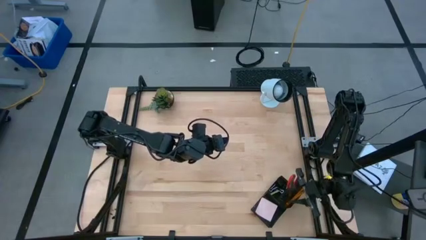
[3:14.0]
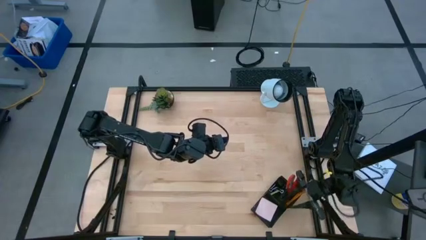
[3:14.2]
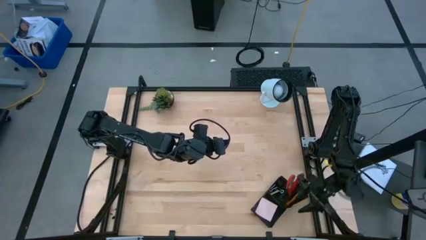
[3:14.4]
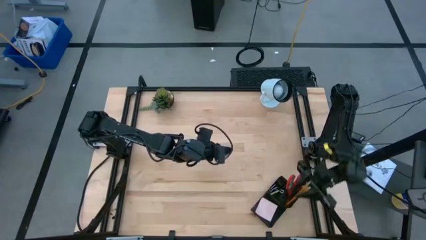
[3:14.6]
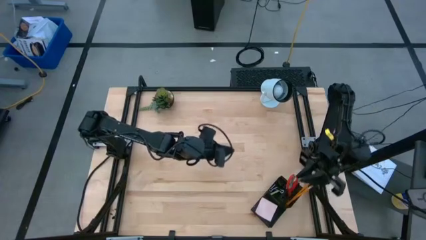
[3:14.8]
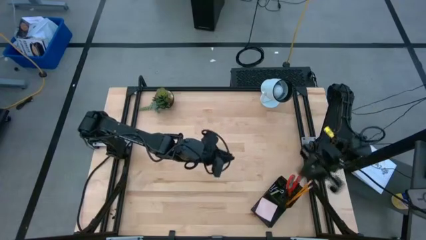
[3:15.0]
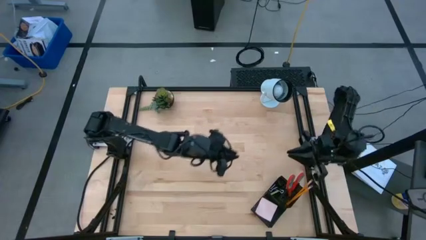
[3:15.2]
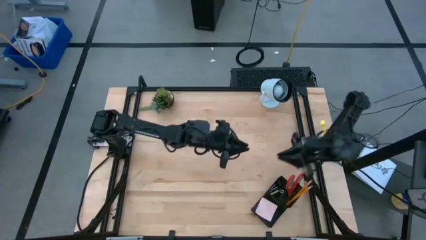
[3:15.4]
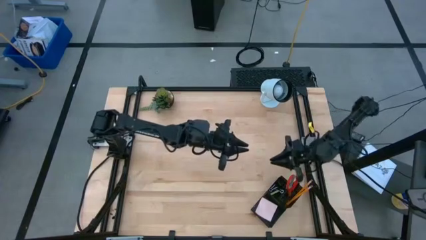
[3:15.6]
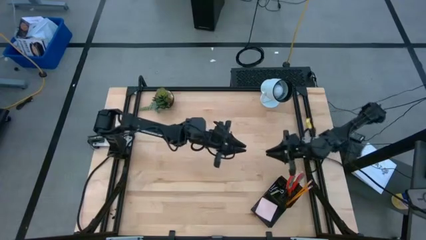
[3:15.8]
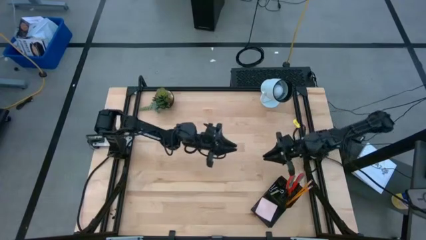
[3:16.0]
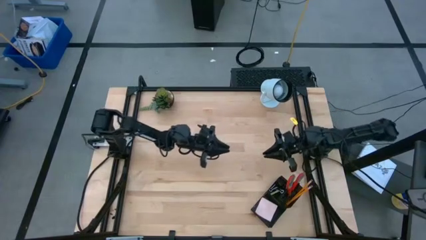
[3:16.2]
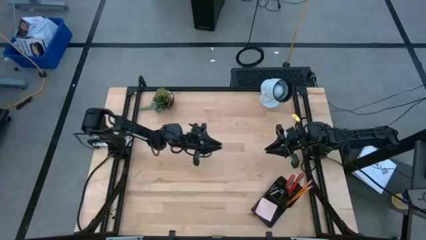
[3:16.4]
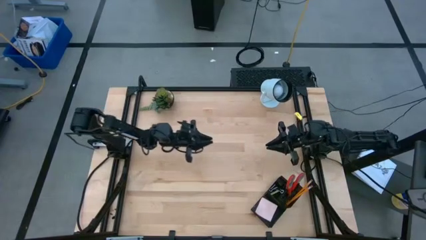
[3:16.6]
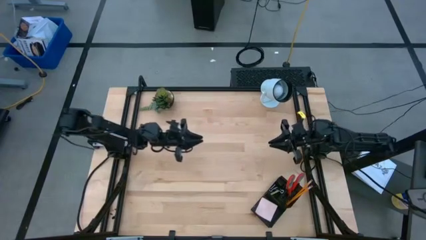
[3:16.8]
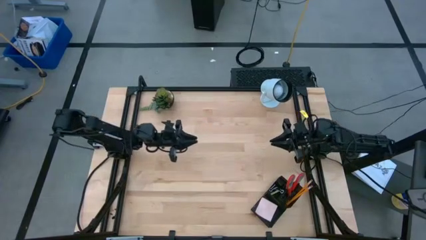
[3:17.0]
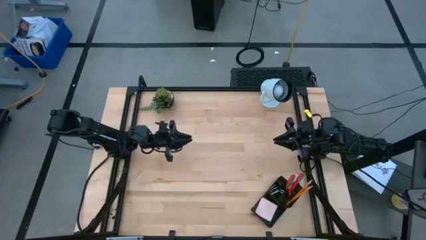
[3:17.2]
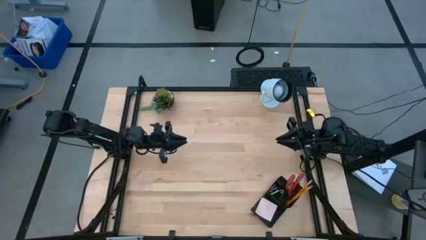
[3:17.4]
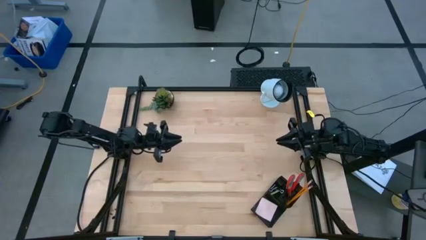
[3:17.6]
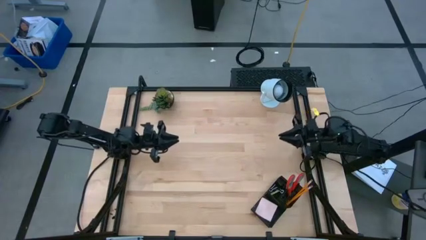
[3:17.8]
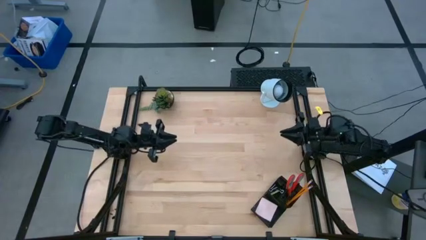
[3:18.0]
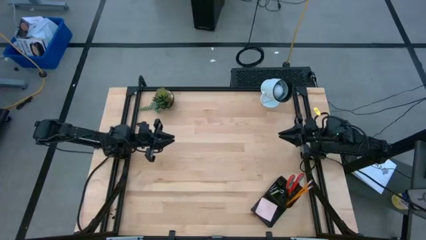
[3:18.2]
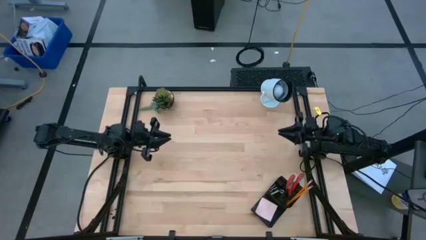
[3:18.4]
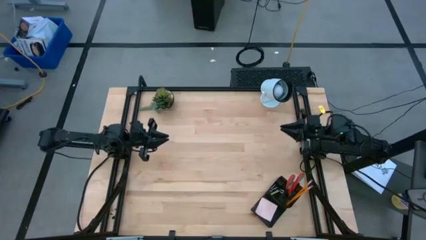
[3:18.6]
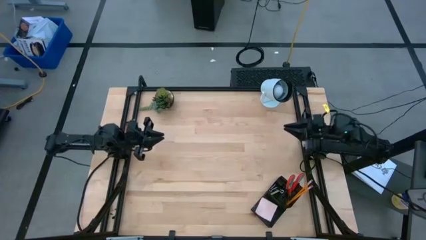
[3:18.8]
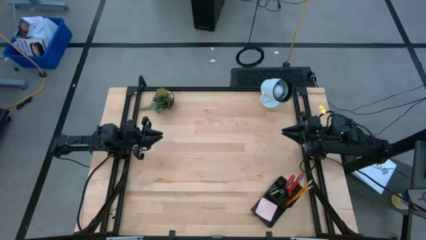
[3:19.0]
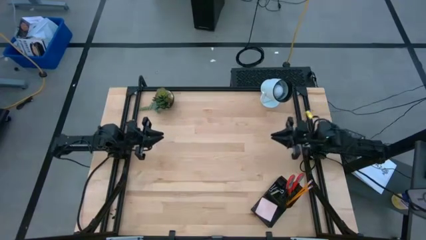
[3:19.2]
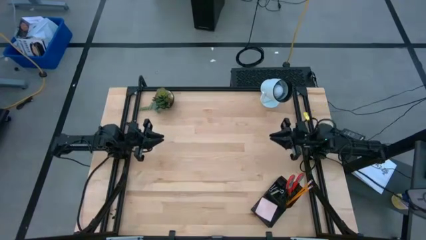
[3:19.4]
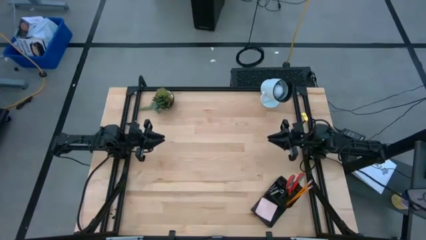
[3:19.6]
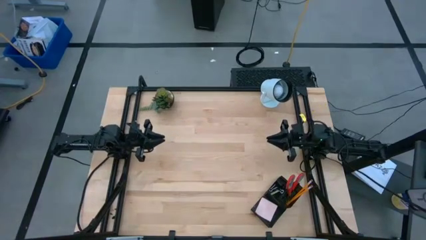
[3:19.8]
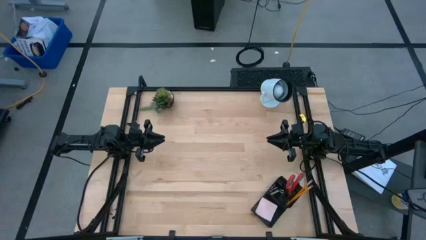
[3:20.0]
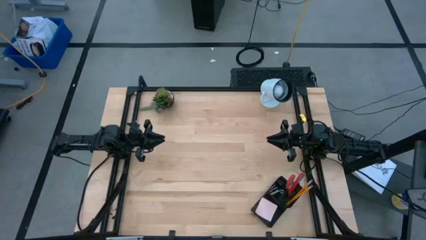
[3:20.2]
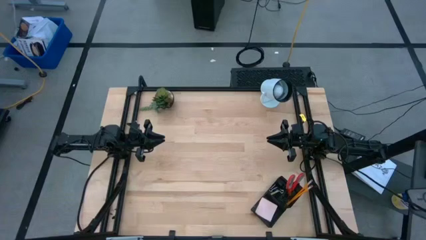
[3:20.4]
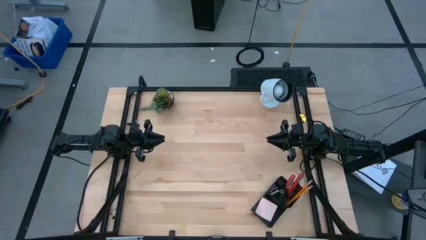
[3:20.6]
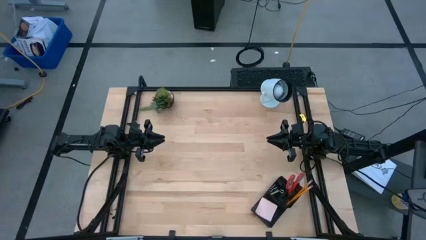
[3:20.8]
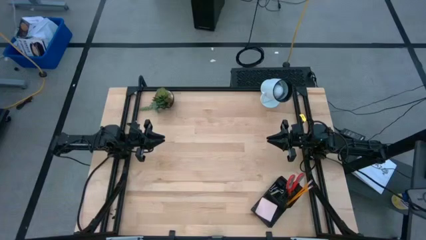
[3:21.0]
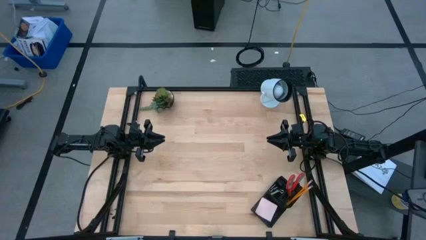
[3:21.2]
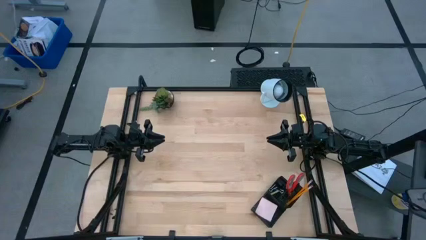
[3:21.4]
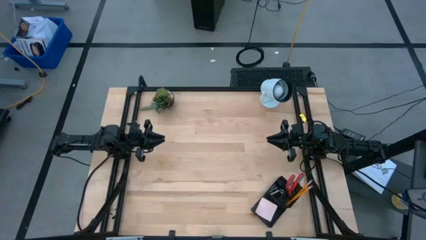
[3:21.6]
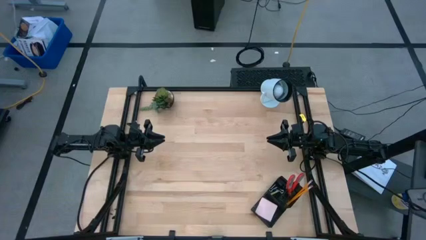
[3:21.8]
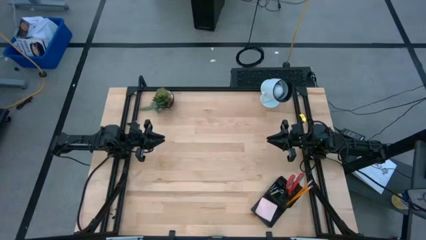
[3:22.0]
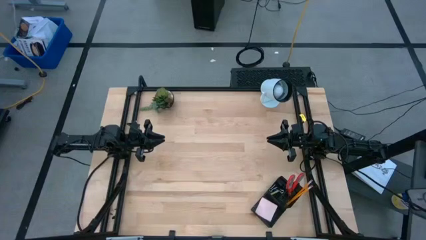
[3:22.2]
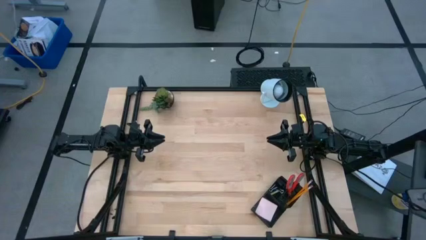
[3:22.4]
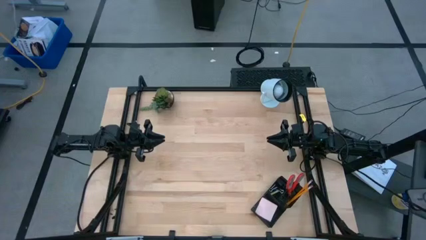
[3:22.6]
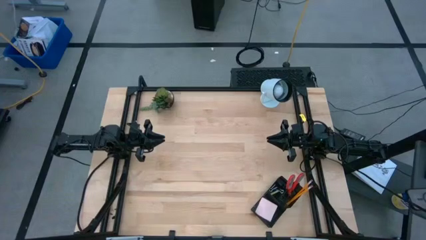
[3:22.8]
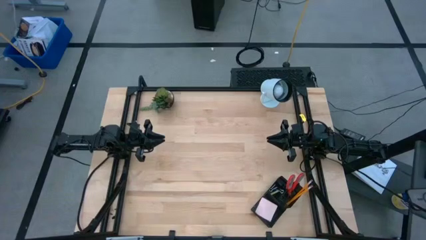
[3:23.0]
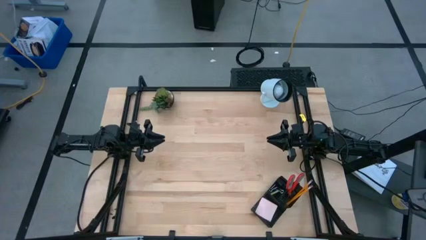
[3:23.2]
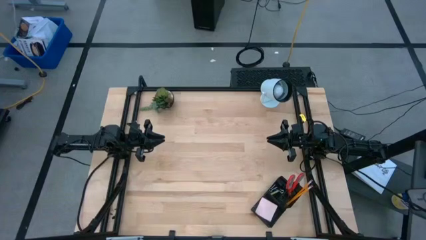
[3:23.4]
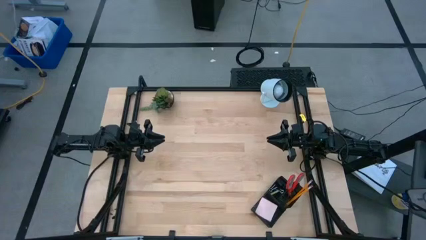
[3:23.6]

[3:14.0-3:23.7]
Task: Pick and place office supplies into organizer
Return to Home Position

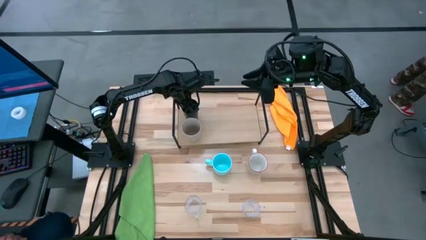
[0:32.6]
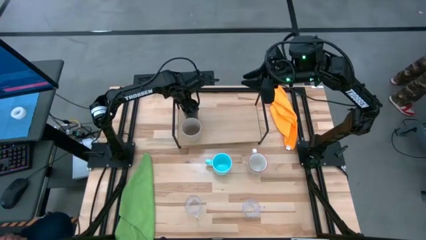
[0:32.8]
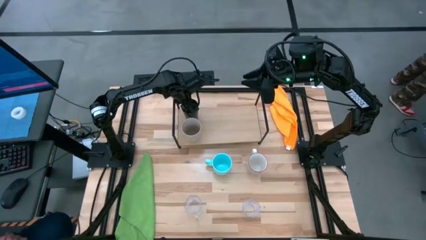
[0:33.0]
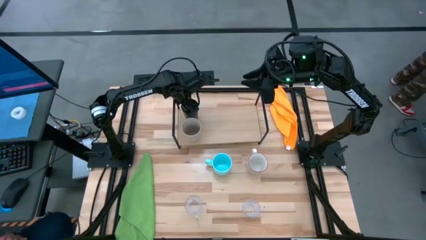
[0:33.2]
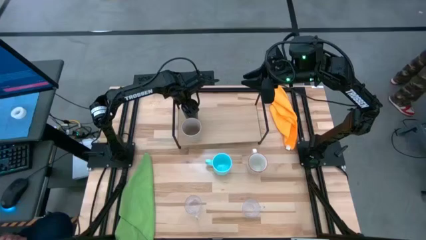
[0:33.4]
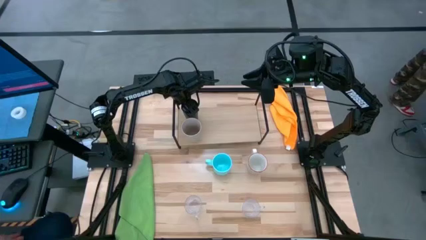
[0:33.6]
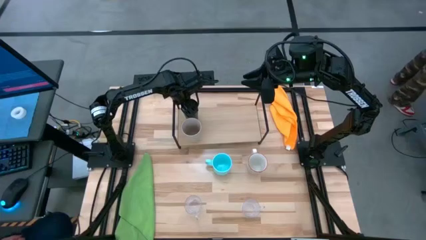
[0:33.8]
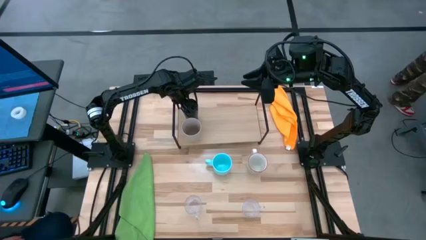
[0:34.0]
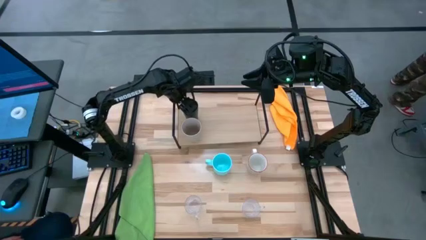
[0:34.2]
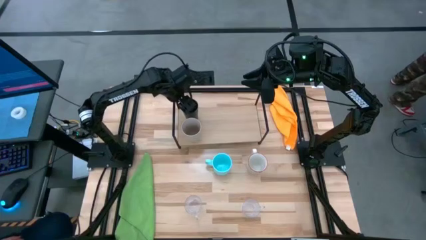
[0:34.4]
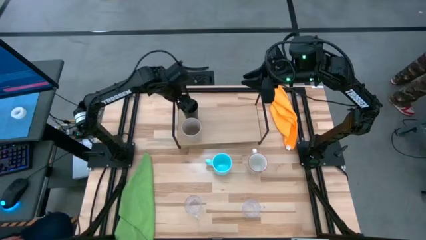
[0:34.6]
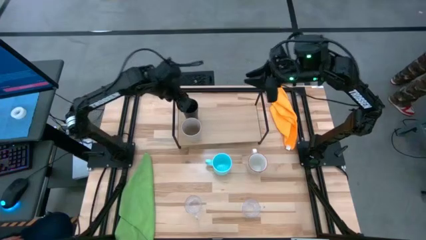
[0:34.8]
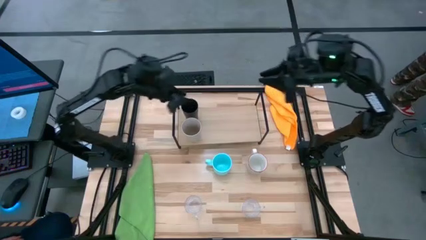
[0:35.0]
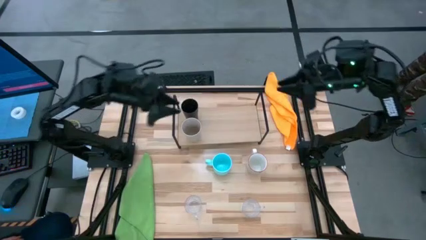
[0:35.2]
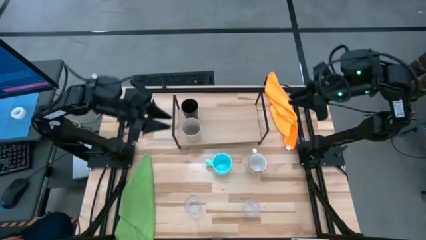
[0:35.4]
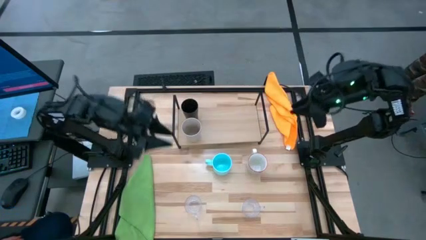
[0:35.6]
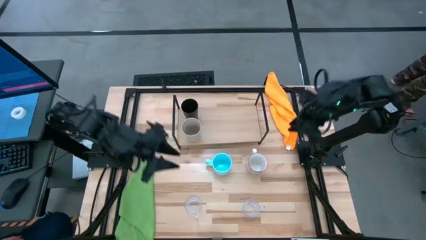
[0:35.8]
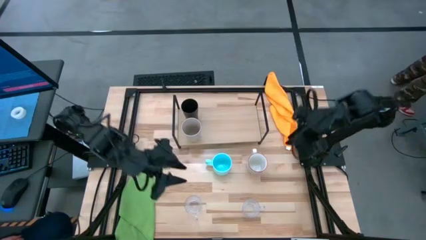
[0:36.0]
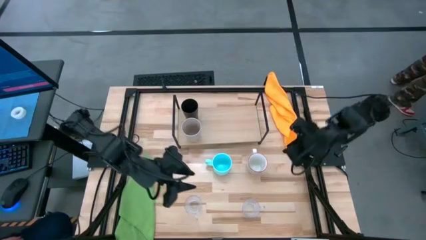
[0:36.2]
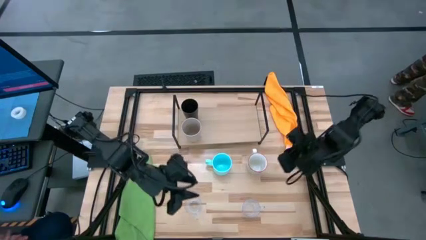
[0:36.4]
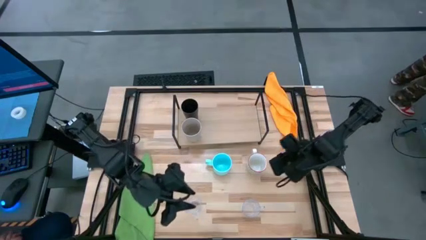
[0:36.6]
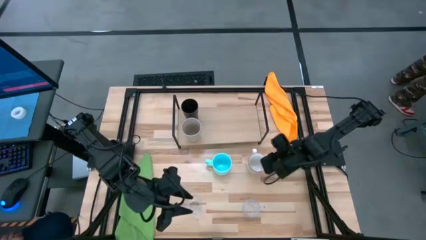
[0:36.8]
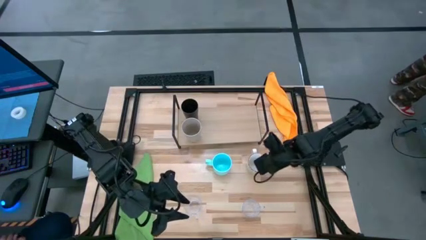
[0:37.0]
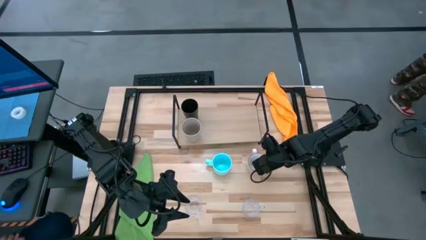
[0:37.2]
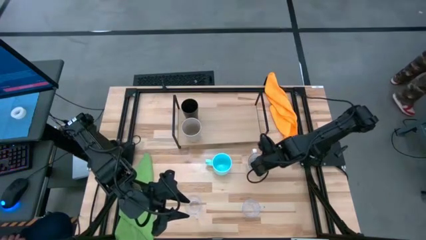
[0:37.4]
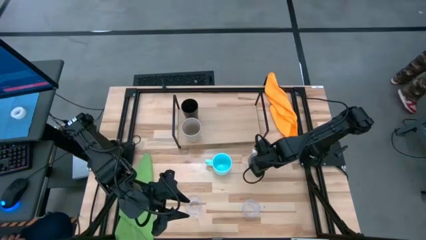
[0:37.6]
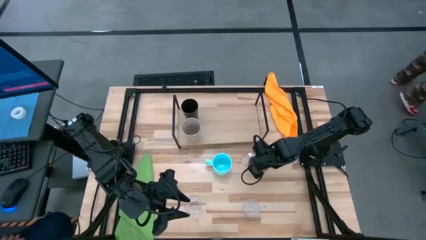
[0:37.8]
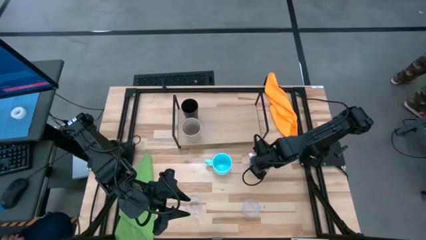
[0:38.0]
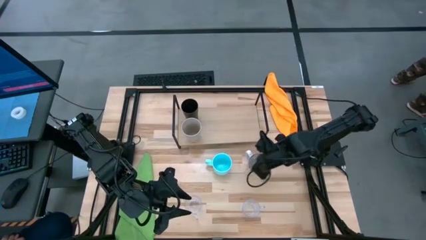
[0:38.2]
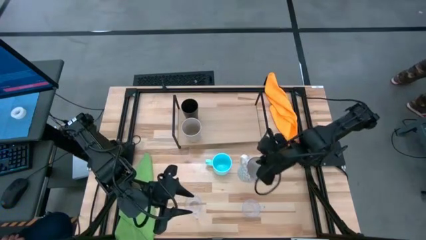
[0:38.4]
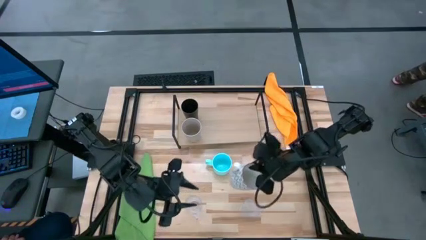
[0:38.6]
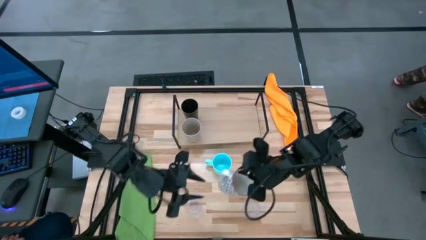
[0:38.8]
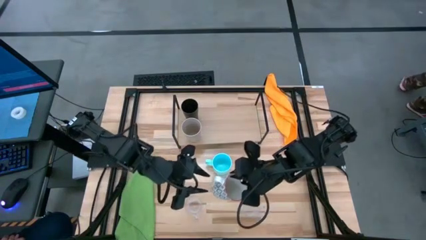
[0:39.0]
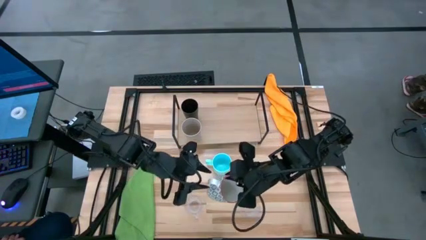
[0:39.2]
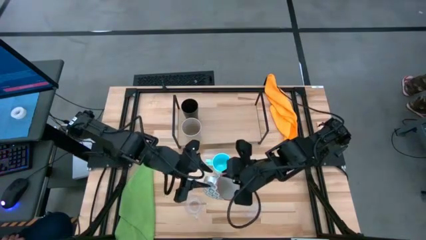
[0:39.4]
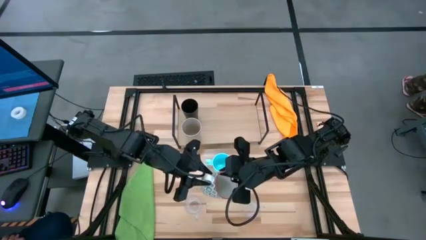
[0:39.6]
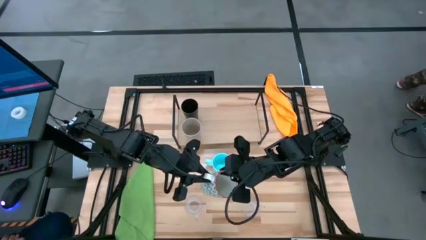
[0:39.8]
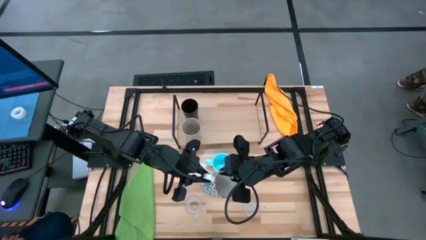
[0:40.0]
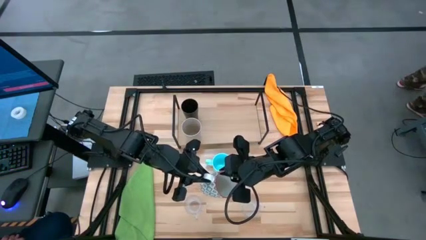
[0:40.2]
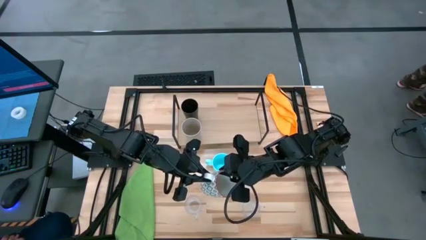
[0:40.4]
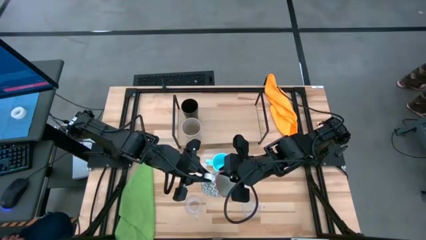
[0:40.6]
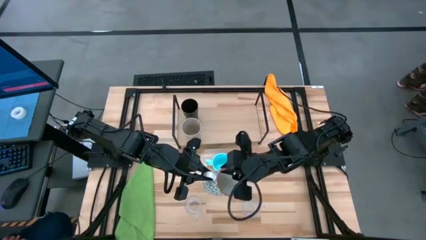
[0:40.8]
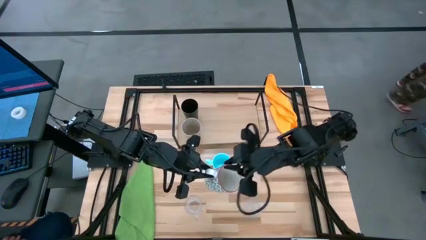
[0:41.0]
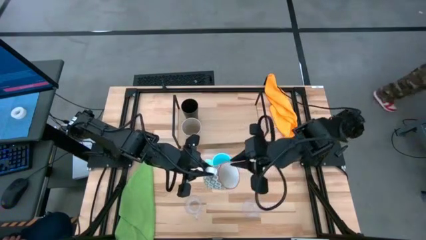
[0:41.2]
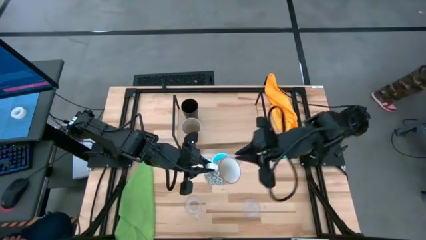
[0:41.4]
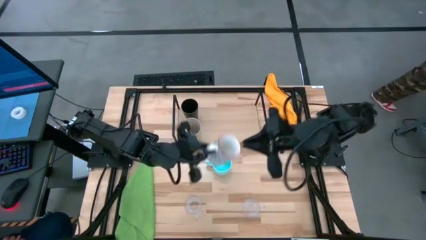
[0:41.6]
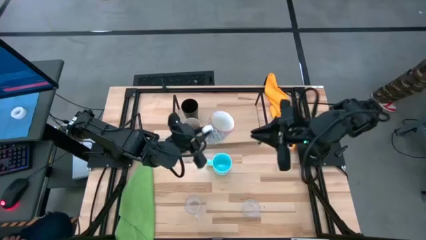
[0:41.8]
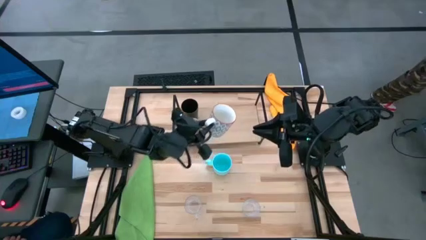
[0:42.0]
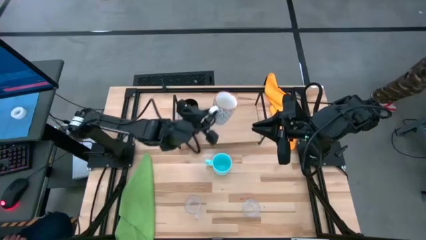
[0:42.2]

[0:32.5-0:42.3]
Task: Stack small to large cups/mugs on shelf
Put the white mug on the shelf
